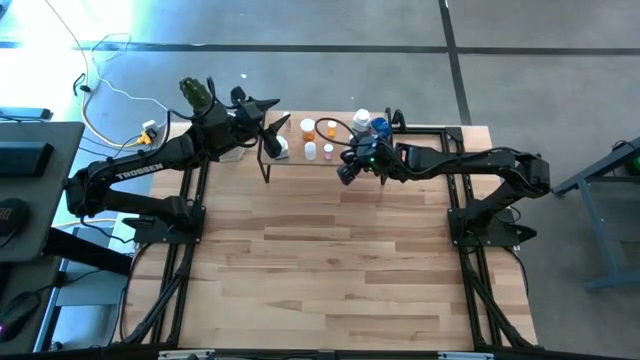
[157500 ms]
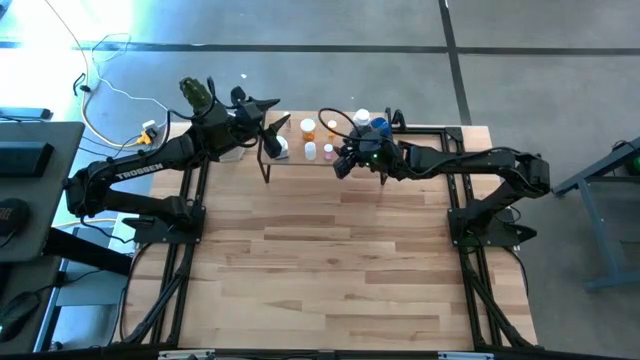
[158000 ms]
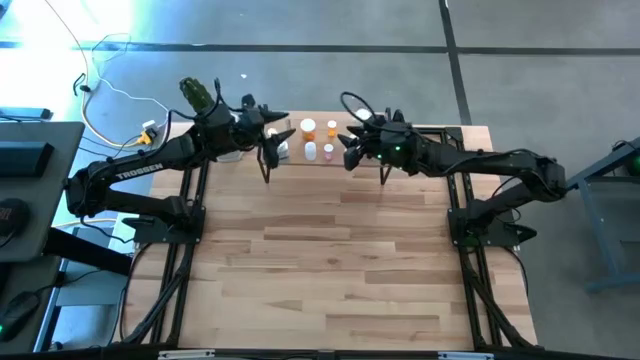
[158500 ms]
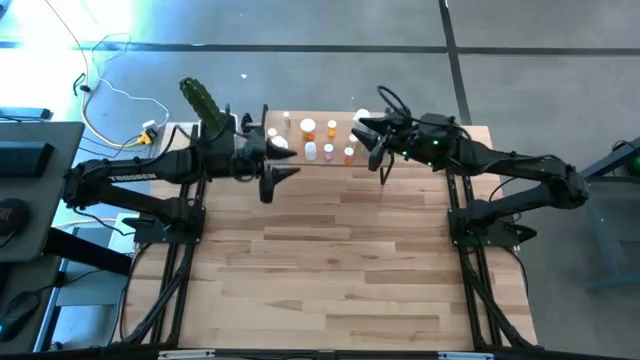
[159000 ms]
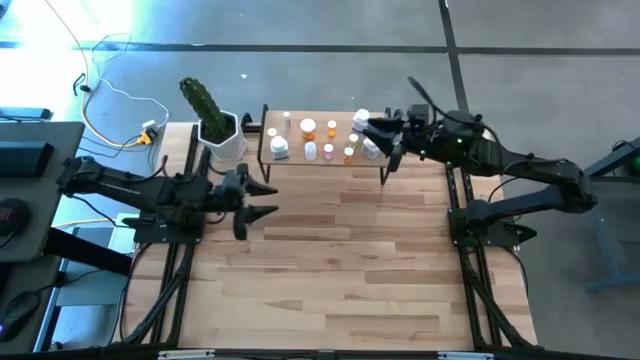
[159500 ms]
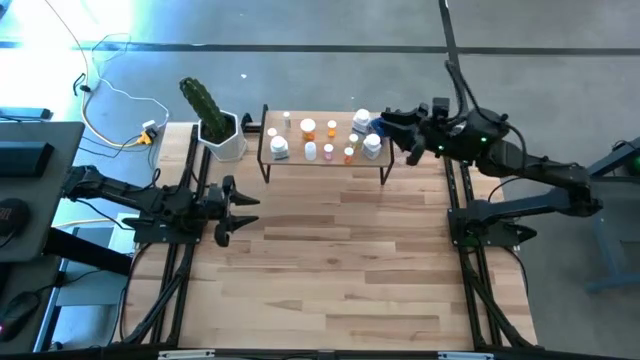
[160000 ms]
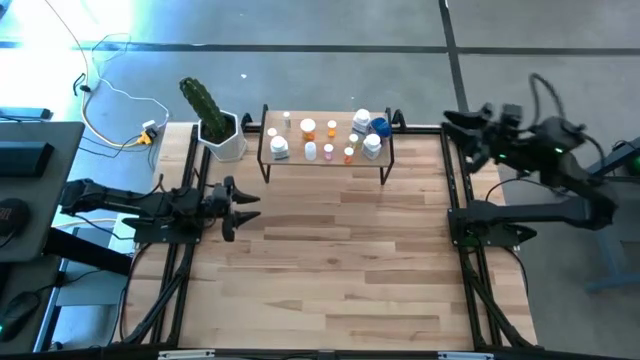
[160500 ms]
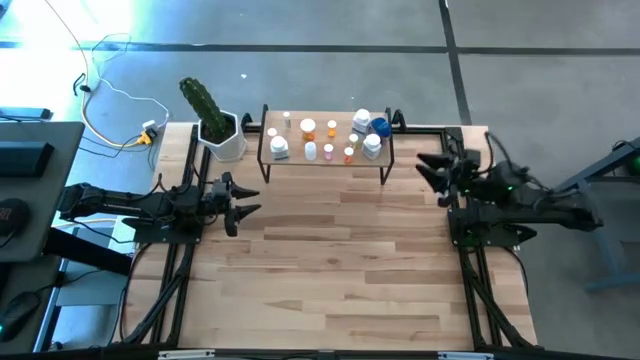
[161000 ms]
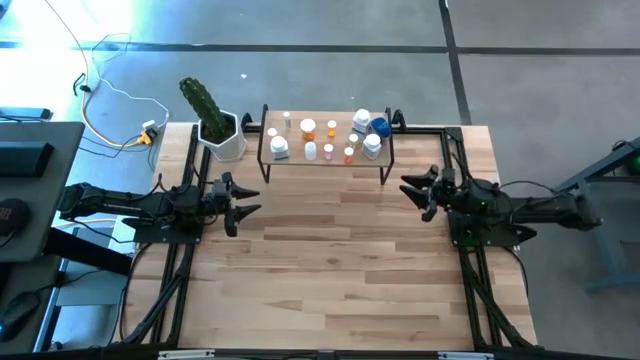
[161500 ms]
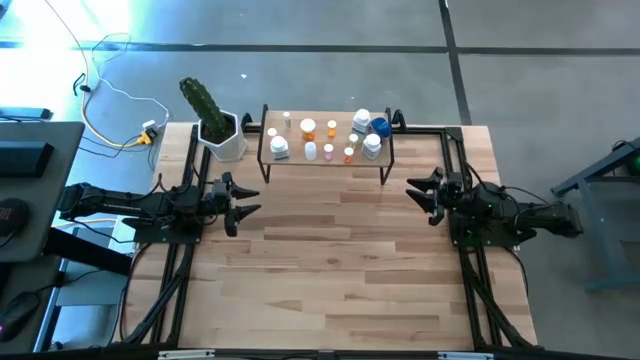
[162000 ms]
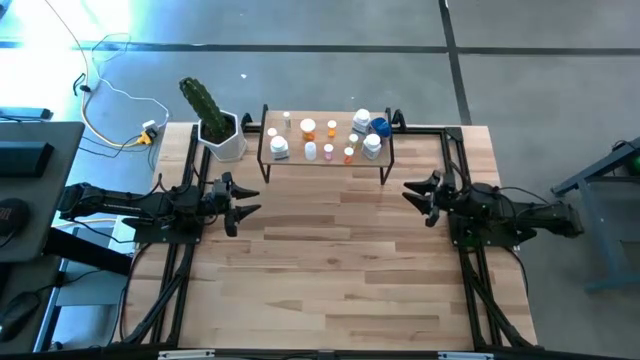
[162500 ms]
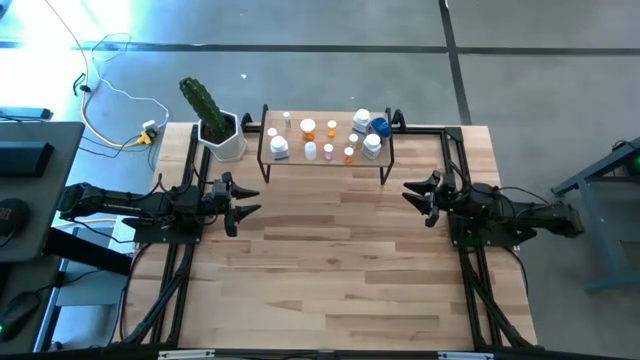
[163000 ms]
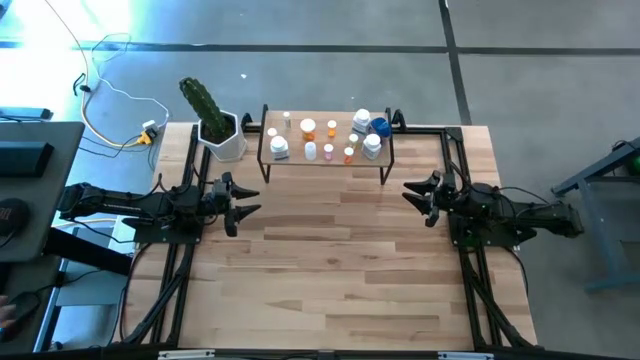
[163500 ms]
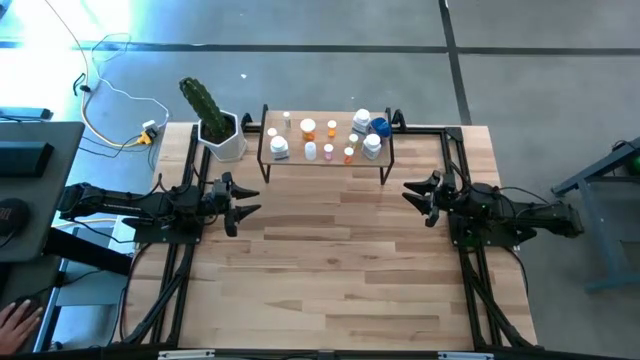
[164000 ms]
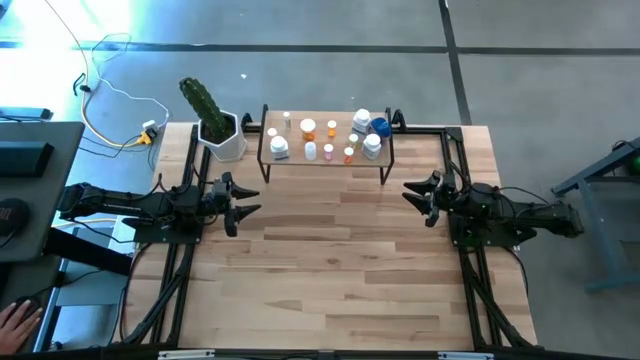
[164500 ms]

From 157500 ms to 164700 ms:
Task: Pick and place medicine bottles onto shelf by color
Return to Home Position

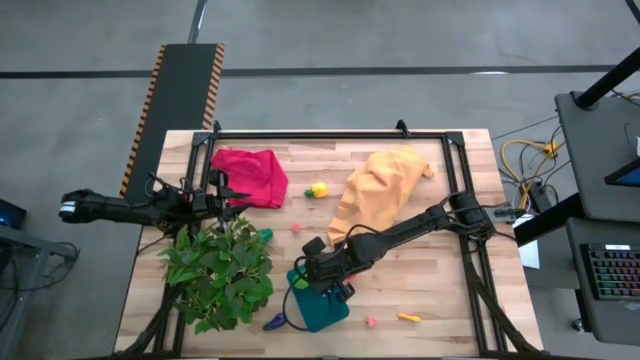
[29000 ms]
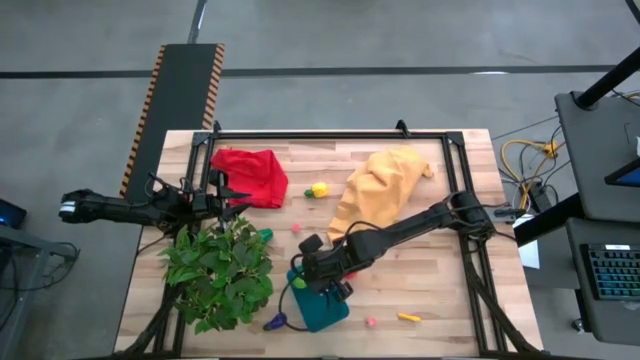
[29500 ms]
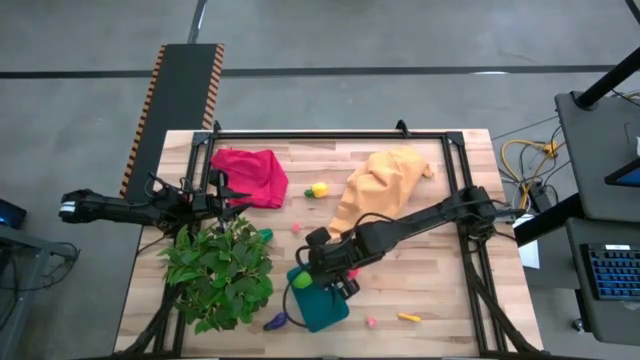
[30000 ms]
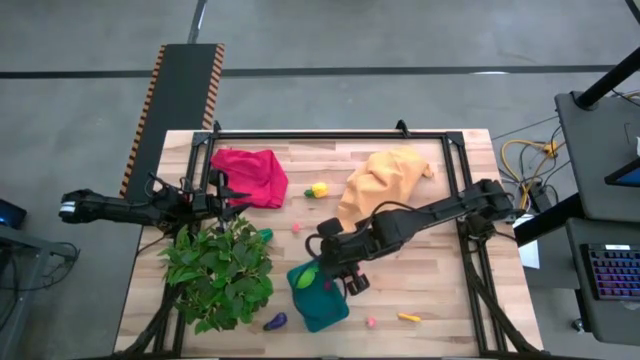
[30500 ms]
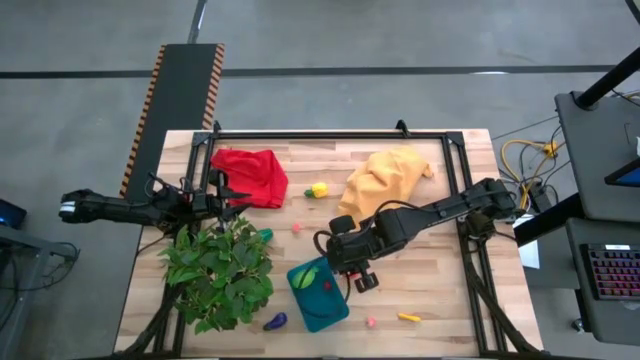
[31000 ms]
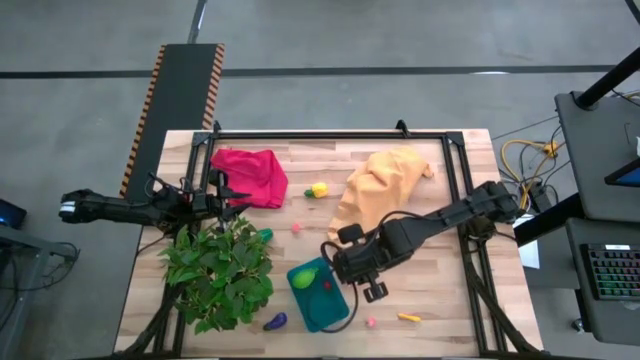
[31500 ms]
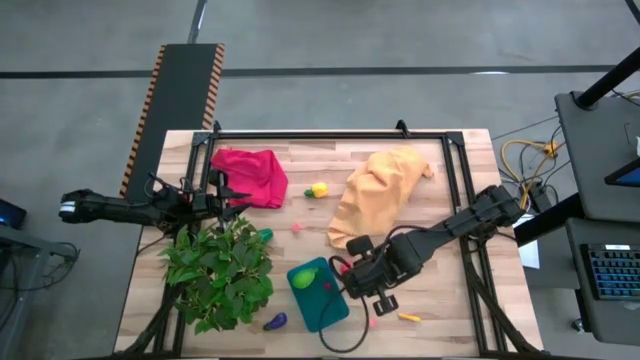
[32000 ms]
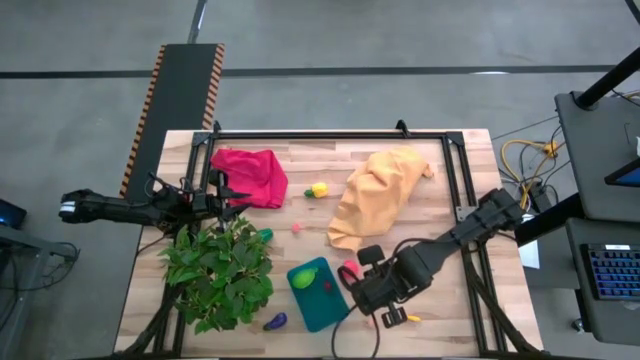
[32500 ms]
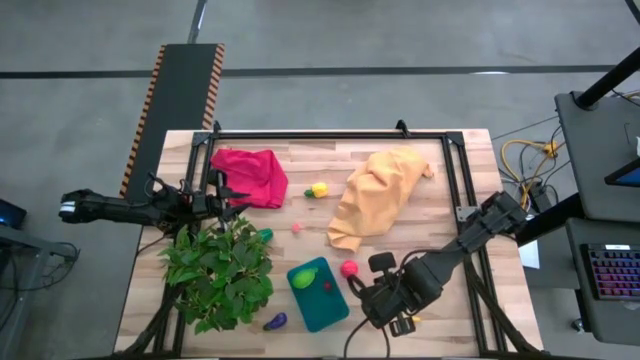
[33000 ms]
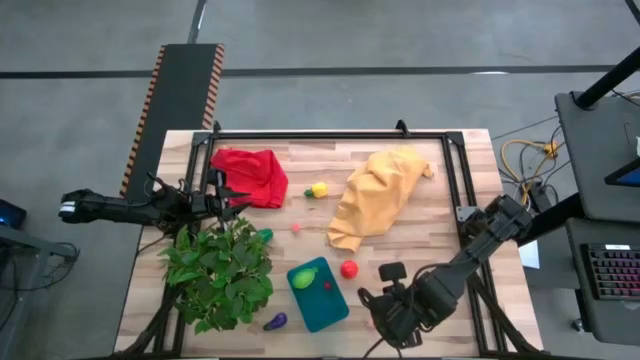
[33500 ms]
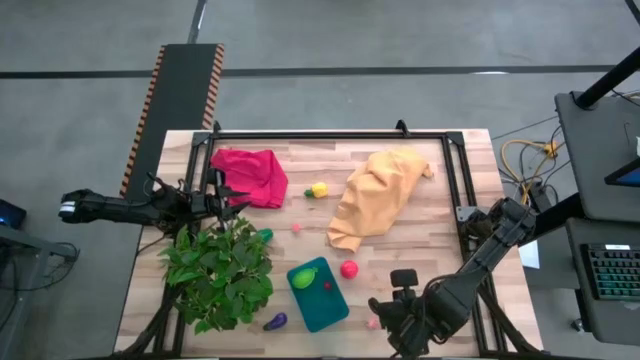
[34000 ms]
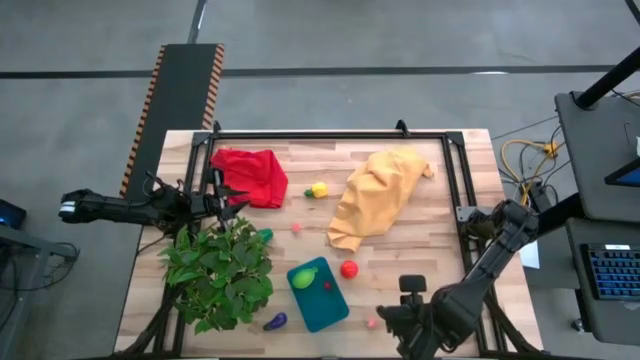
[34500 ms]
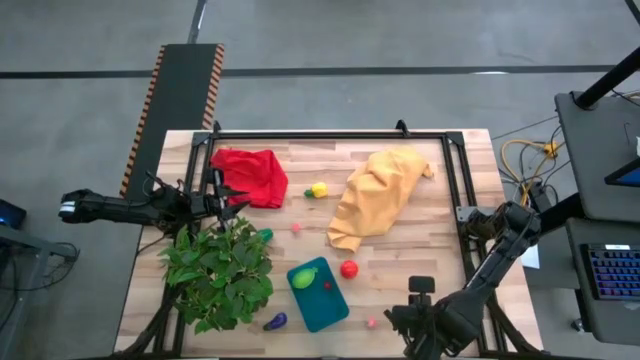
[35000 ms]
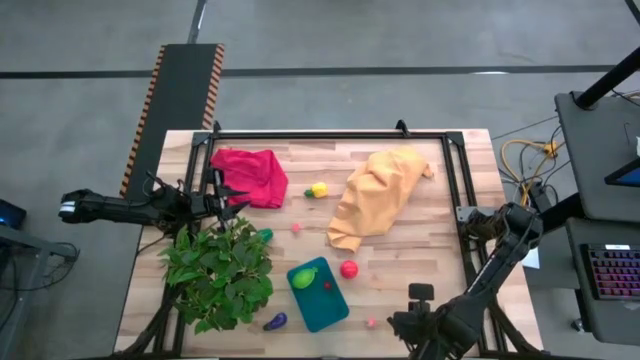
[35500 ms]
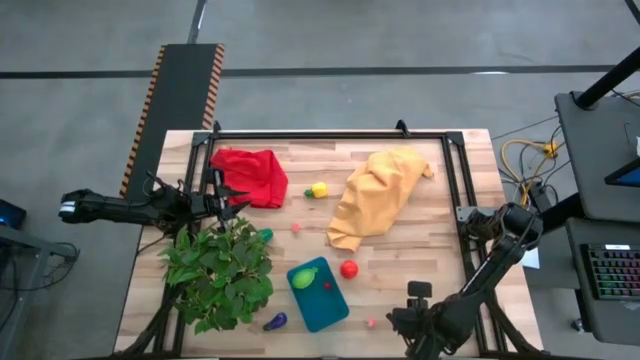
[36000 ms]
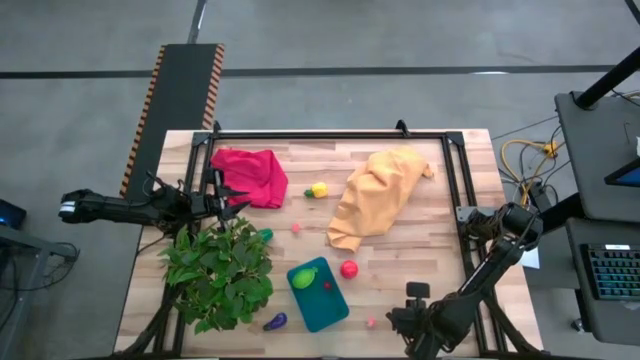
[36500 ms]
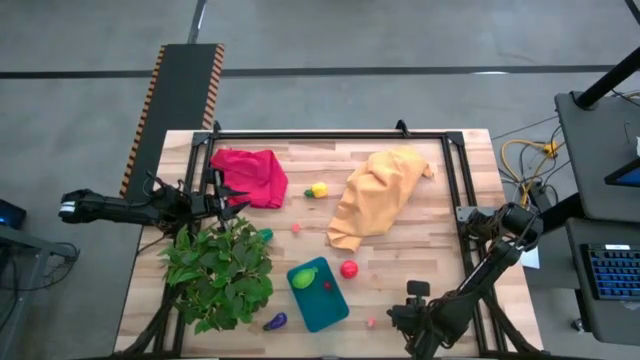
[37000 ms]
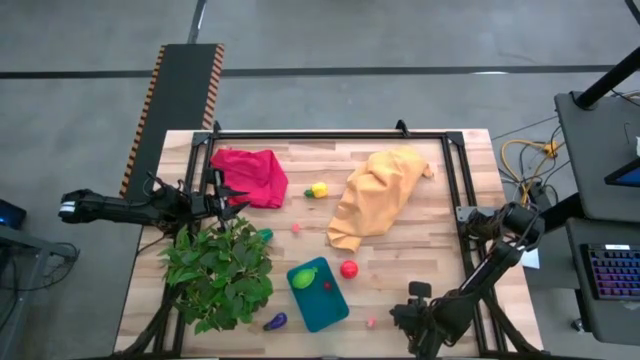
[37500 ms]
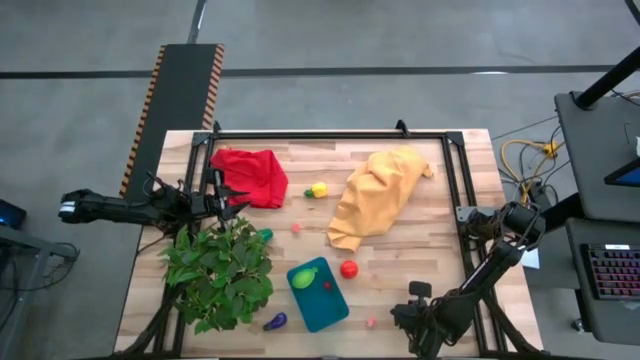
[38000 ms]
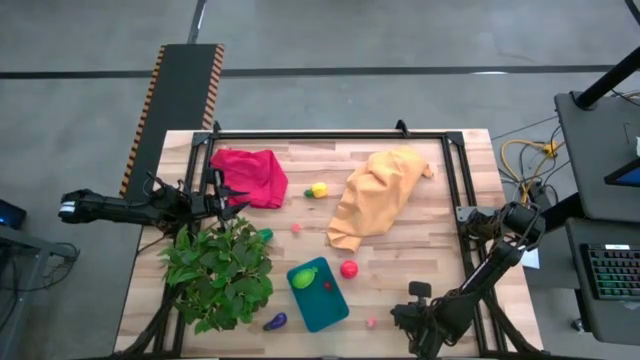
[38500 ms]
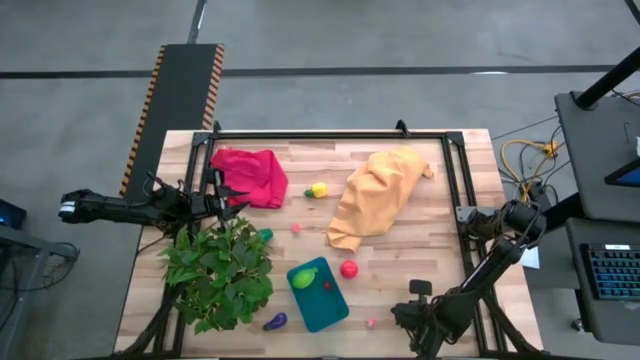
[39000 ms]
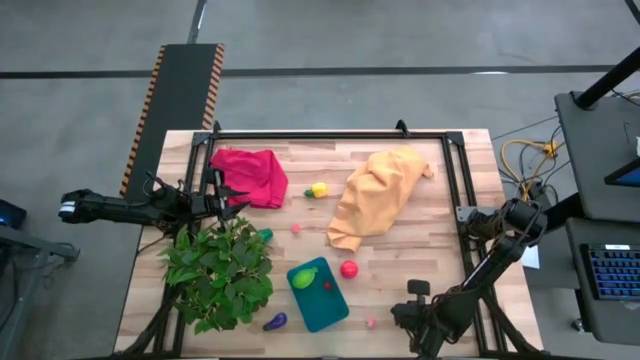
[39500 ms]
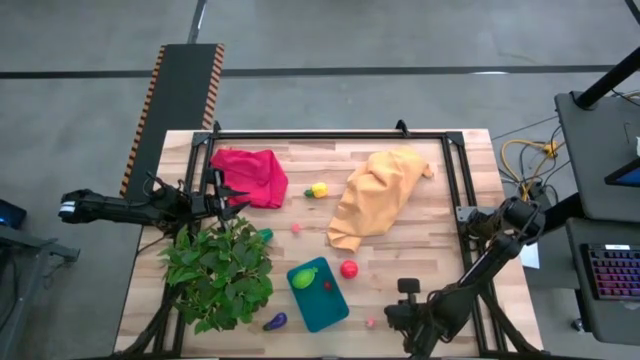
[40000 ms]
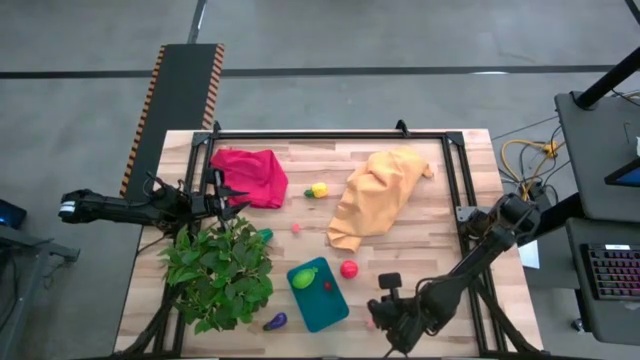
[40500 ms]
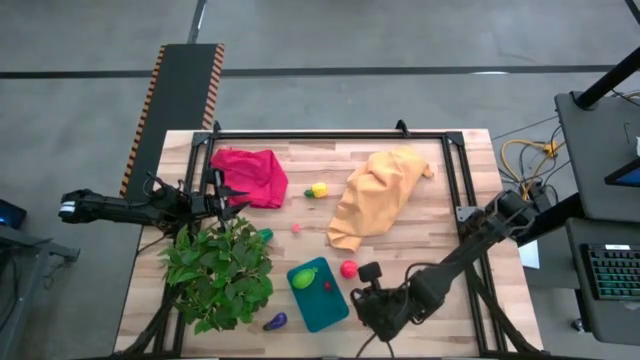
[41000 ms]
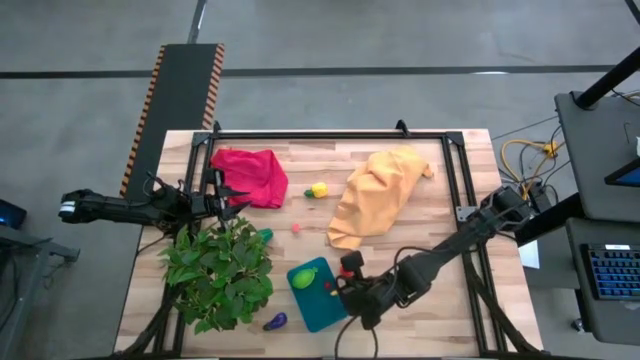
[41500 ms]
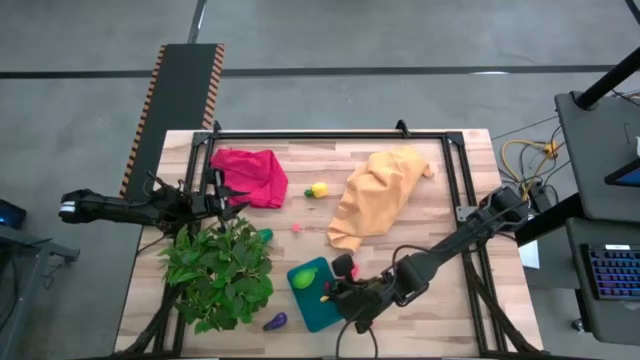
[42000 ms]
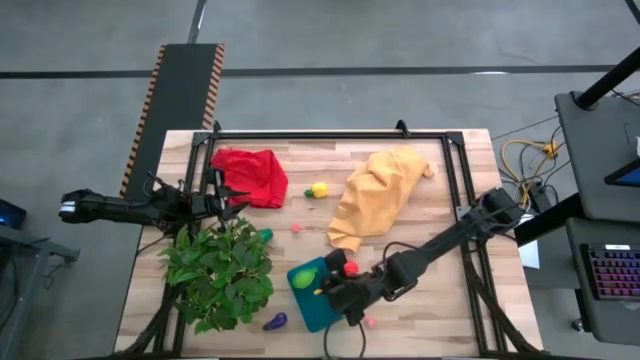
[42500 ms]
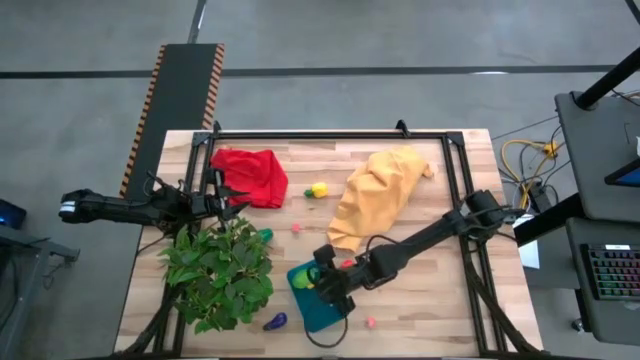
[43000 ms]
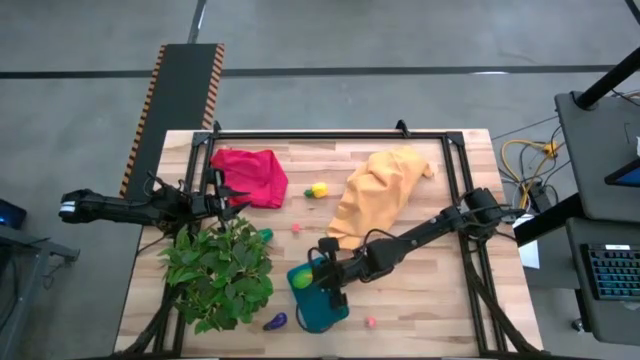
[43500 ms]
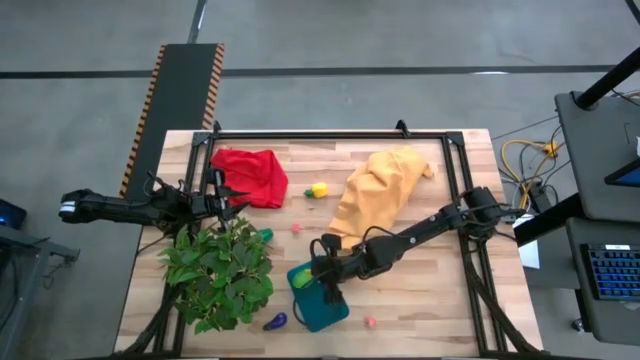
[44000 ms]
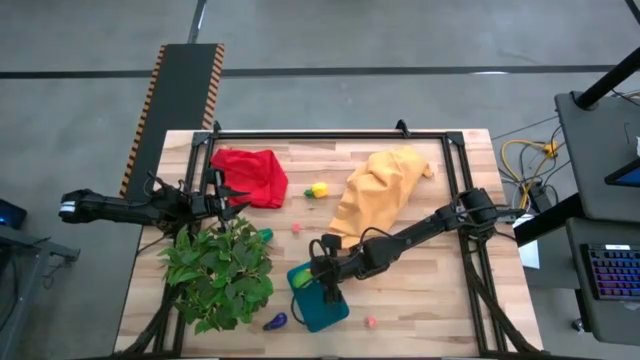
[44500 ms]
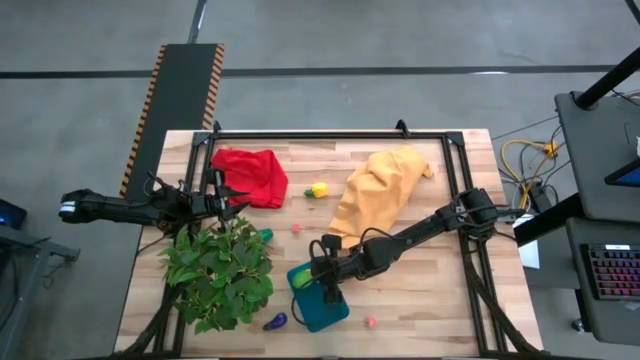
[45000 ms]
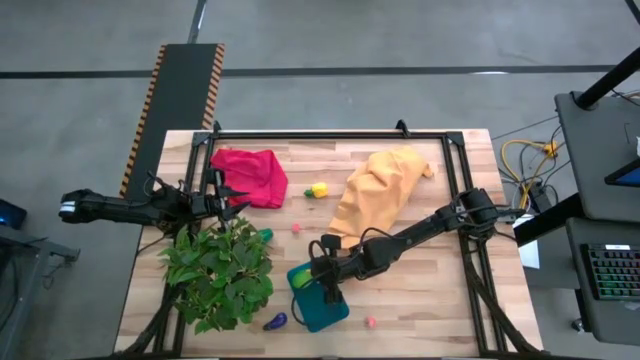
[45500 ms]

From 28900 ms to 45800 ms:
Task: Pick and placing Produce into tupperware
Put the corn into the bin
